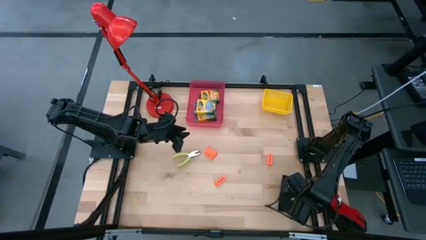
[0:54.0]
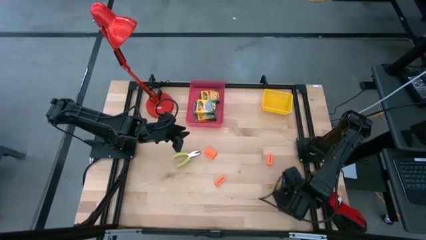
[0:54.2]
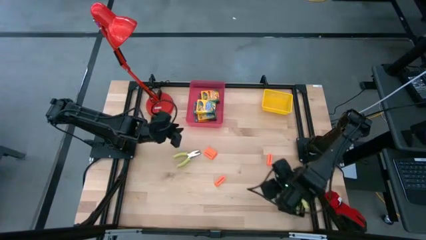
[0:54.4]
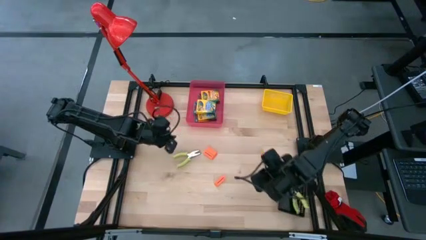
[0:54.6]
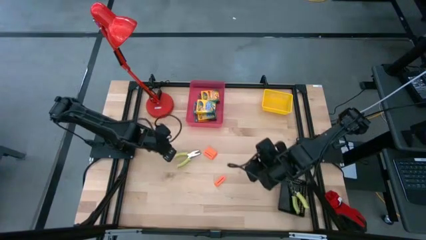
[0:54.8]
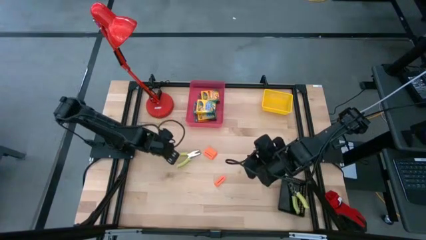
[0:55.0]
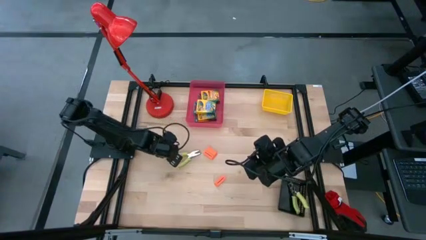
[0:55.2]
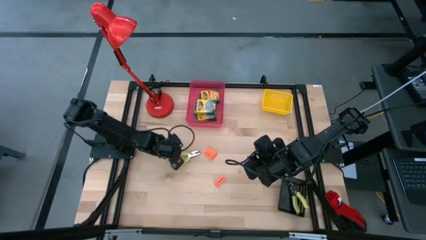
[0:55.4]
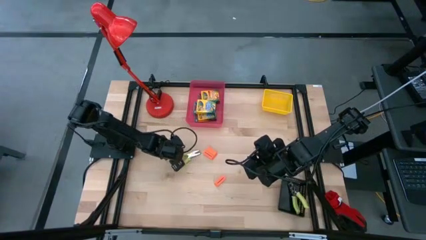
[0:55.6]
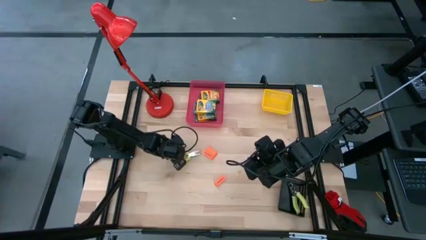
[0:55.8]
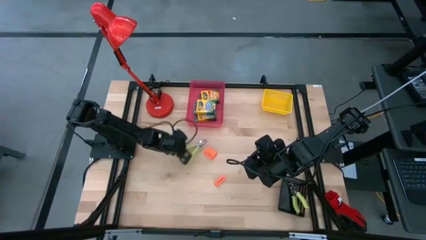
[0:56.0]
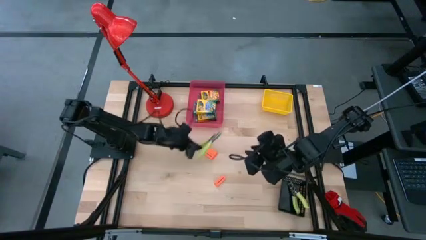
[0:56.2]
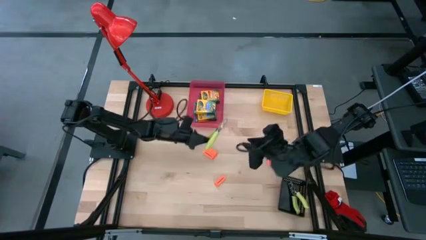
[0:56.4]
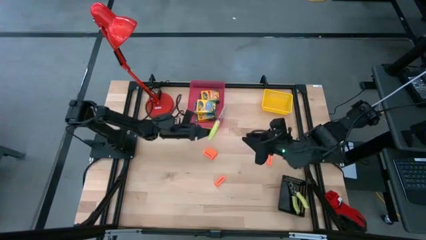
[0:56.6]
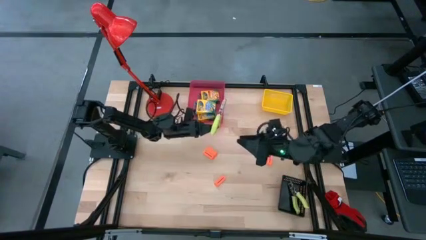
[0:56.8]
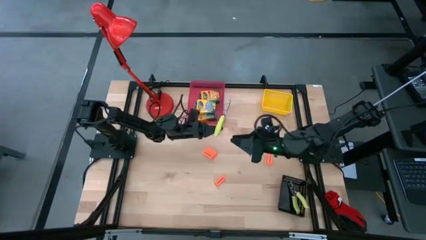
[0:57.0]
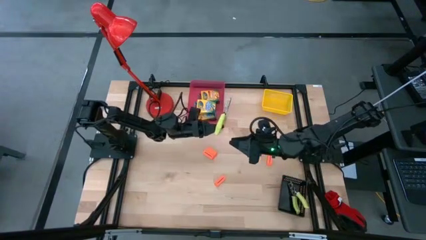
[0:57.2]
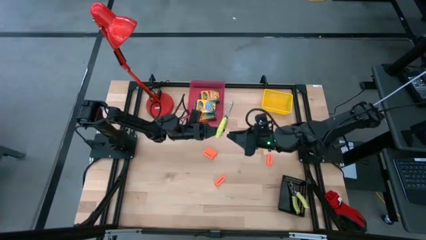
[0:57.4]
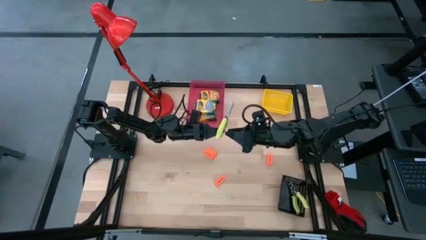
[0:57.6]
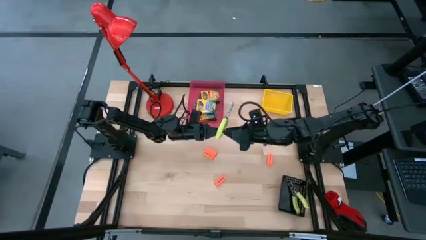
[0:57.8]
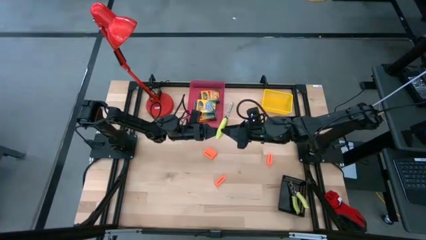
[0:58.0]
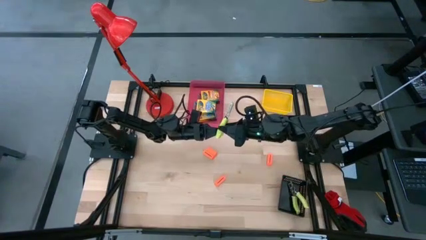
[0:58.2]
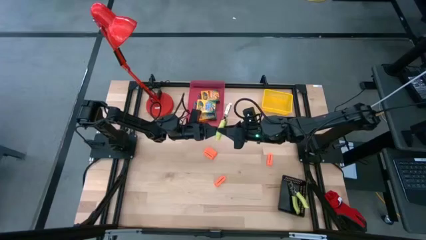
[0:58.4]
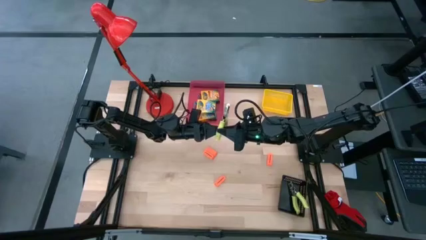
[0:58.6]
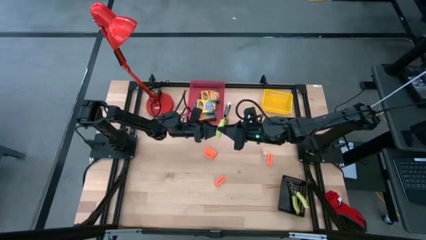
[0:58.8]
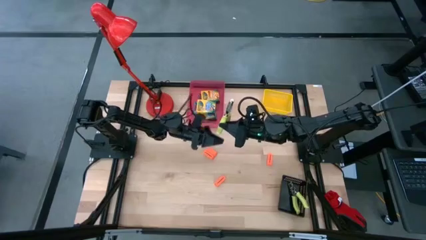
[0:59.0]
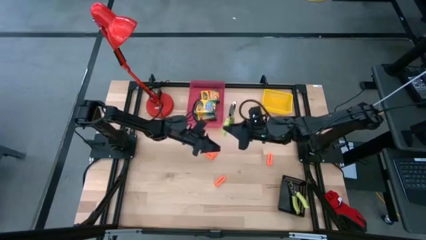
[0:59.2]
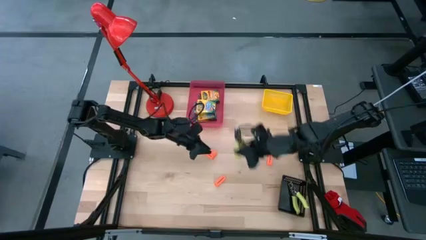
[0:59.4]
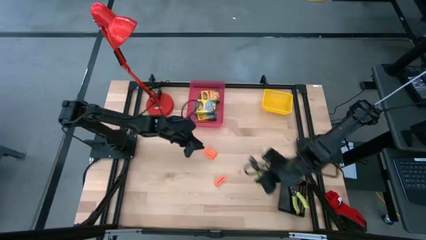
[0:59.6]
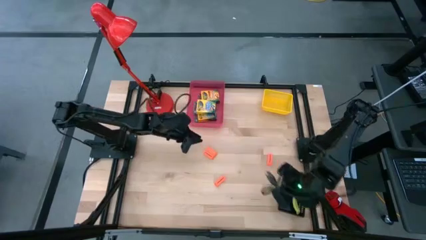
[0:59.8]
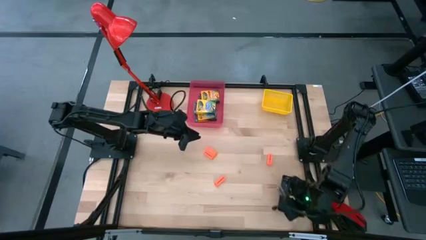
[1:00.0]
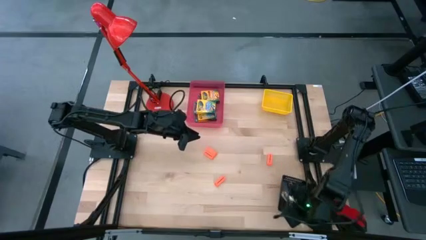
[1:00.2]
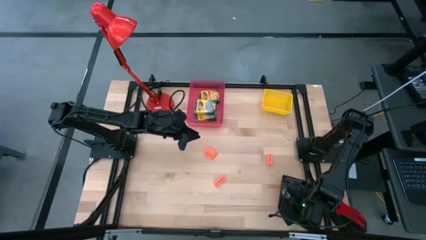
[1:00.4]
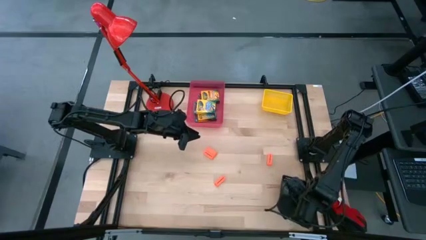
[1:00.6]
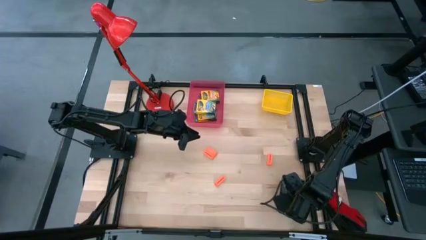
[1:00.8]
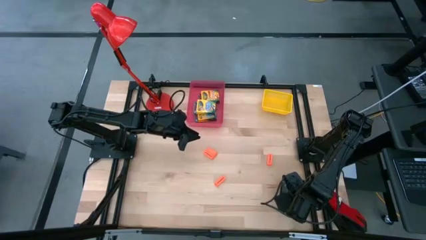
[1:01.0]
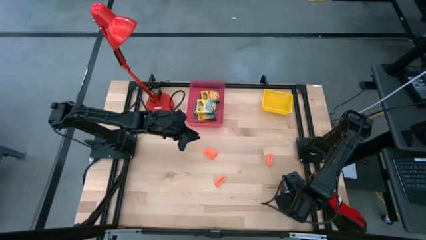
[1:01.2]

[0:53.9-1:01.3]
Task: Pick & Place School Supplies
Put the green puncher into the black bin
